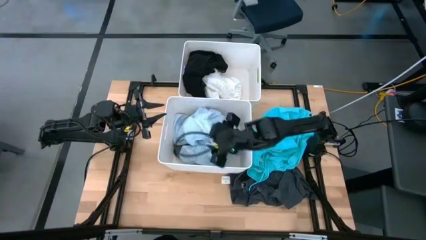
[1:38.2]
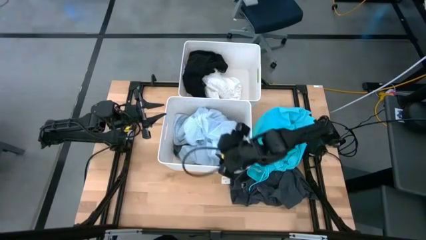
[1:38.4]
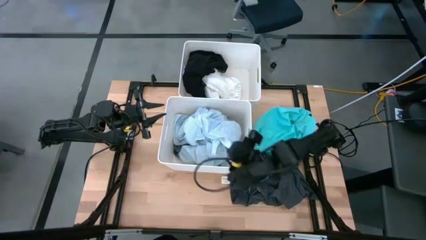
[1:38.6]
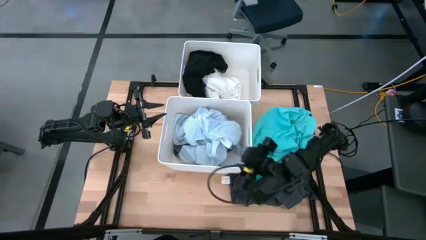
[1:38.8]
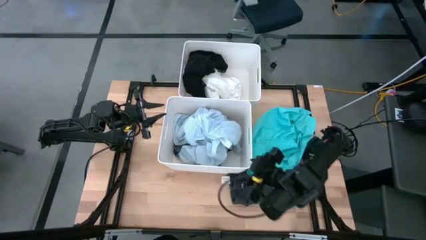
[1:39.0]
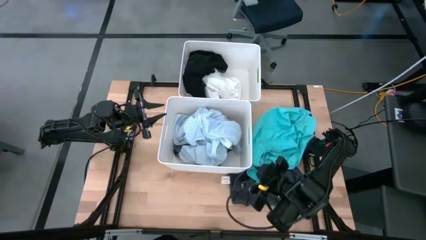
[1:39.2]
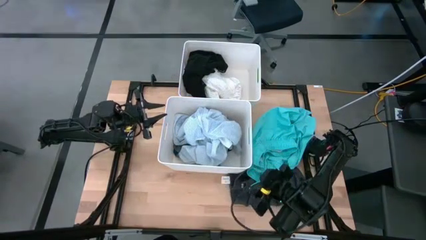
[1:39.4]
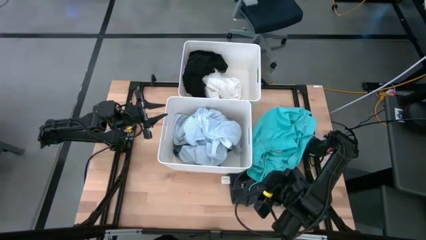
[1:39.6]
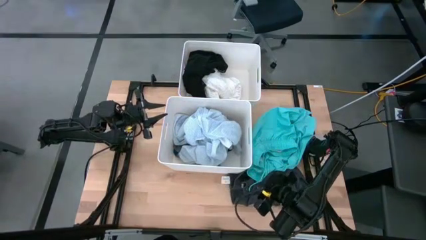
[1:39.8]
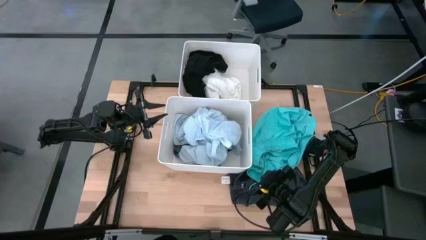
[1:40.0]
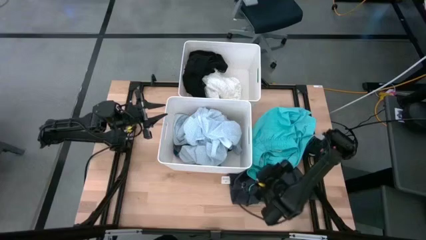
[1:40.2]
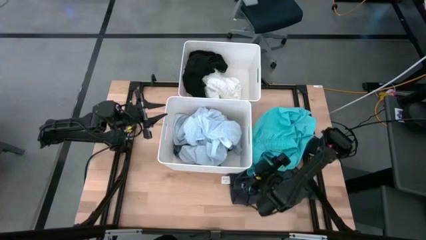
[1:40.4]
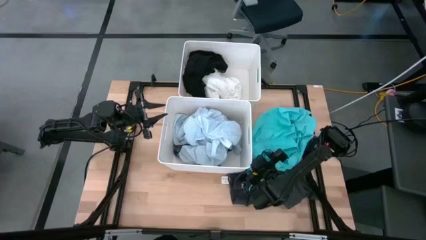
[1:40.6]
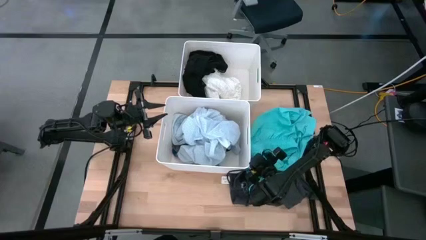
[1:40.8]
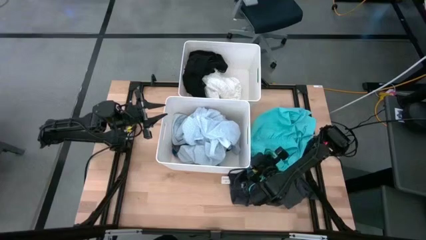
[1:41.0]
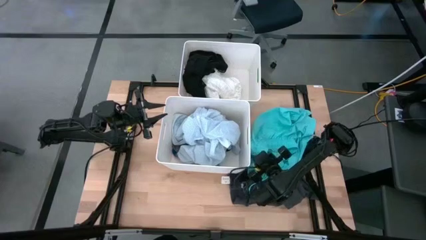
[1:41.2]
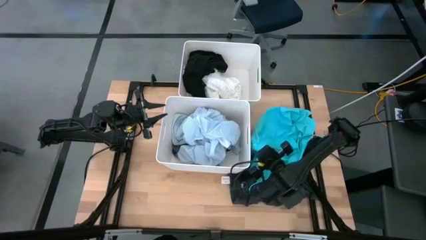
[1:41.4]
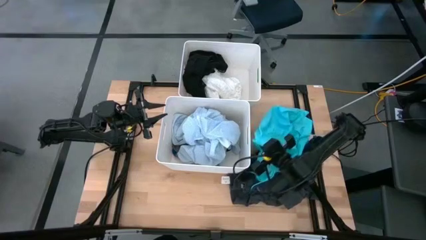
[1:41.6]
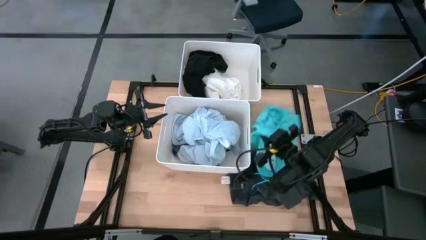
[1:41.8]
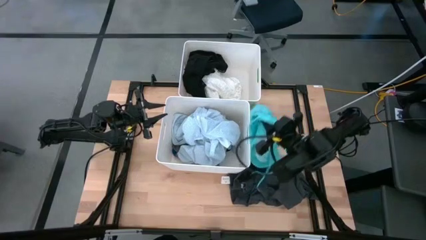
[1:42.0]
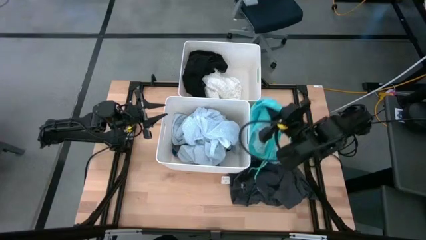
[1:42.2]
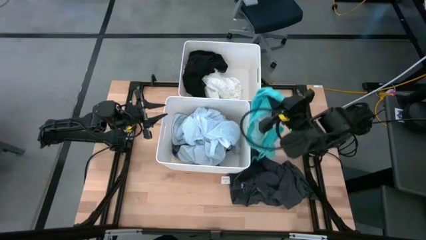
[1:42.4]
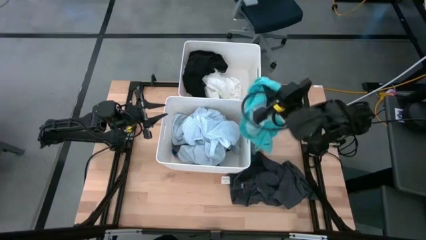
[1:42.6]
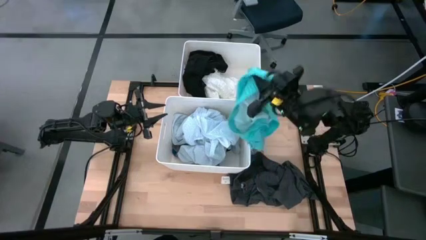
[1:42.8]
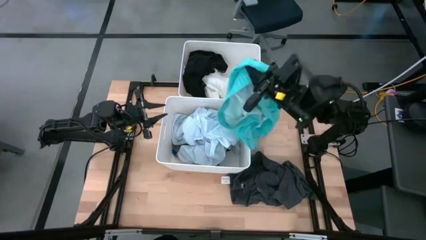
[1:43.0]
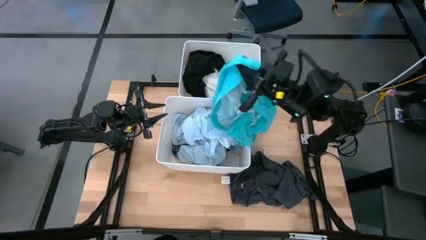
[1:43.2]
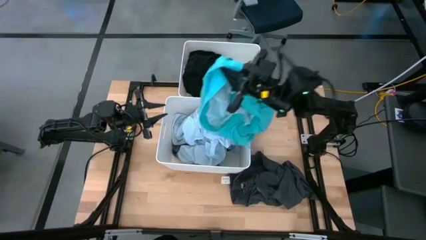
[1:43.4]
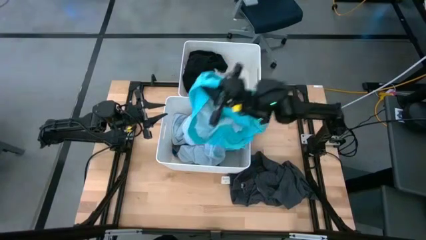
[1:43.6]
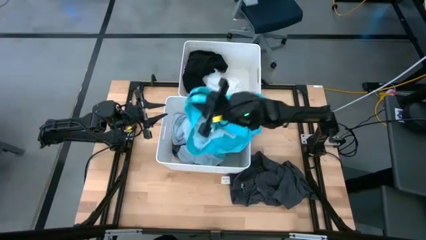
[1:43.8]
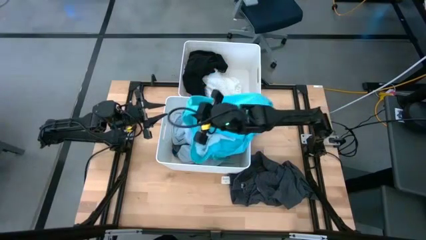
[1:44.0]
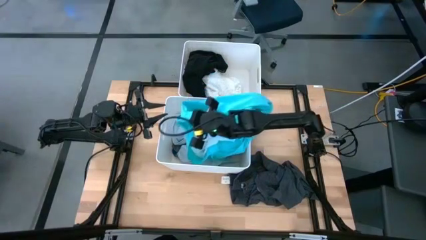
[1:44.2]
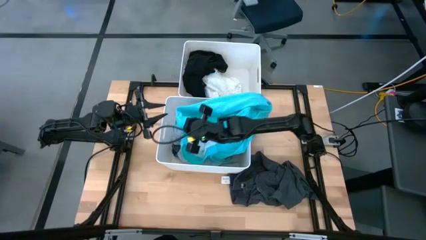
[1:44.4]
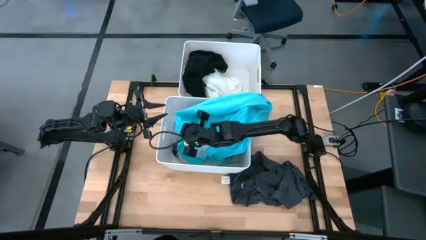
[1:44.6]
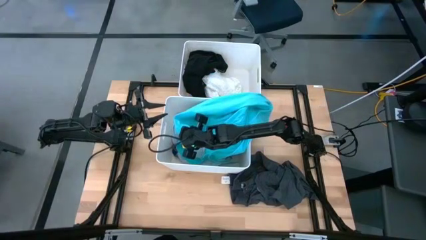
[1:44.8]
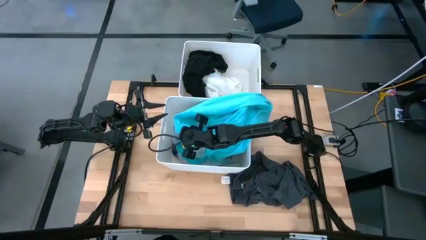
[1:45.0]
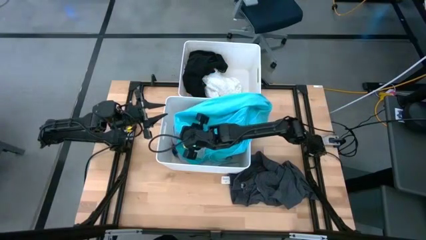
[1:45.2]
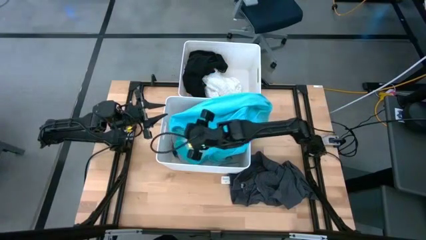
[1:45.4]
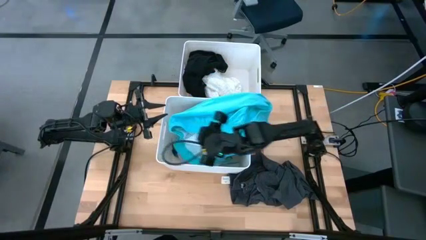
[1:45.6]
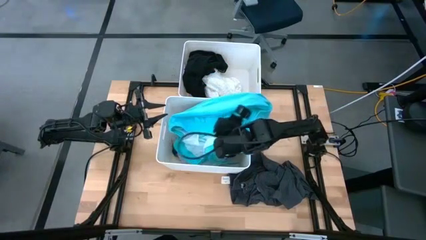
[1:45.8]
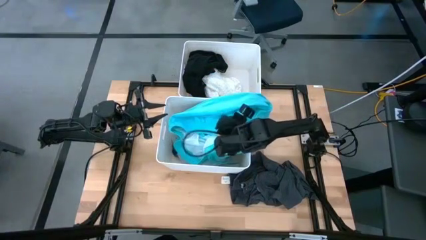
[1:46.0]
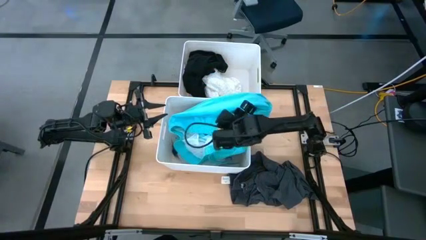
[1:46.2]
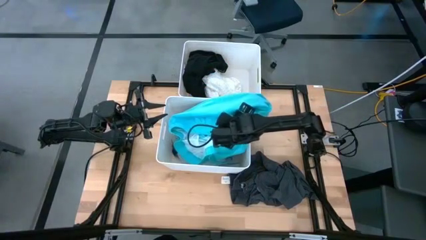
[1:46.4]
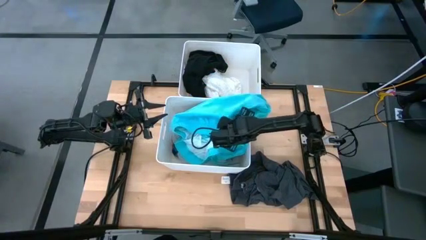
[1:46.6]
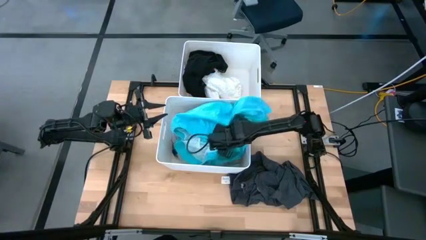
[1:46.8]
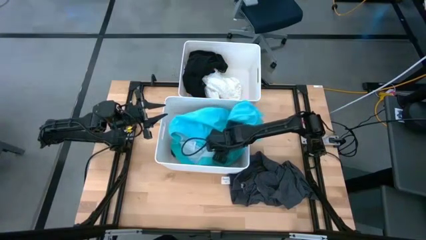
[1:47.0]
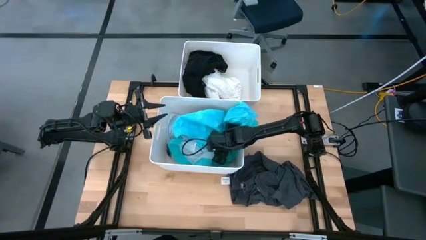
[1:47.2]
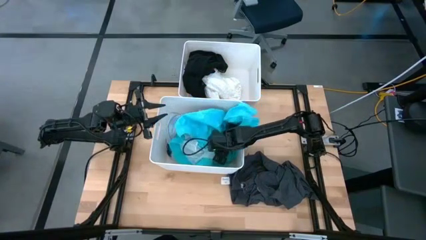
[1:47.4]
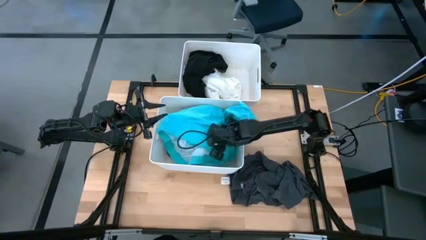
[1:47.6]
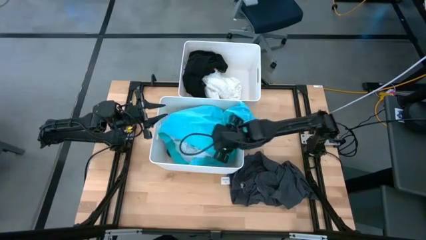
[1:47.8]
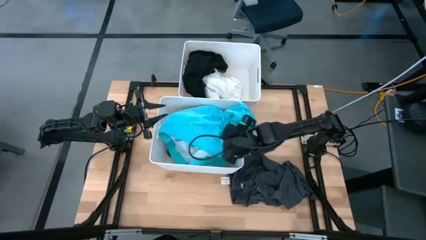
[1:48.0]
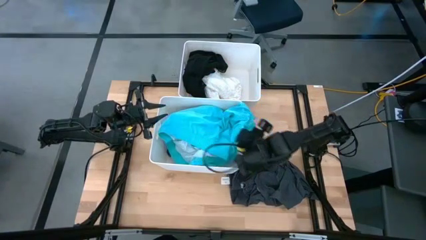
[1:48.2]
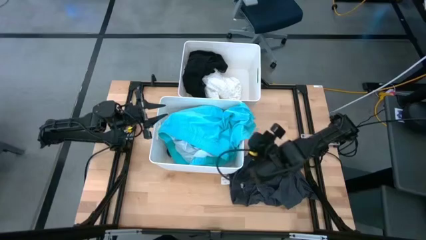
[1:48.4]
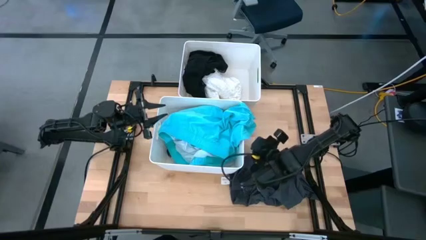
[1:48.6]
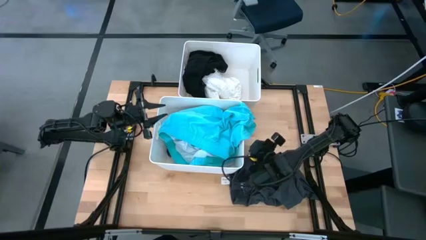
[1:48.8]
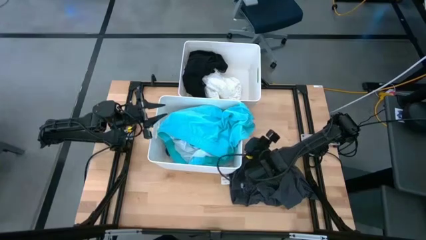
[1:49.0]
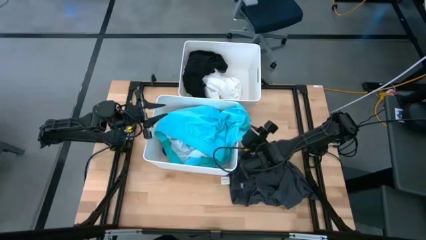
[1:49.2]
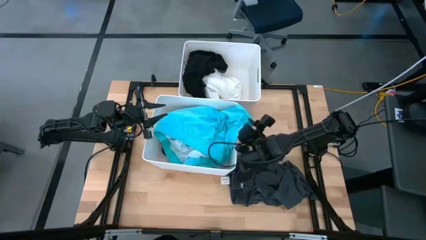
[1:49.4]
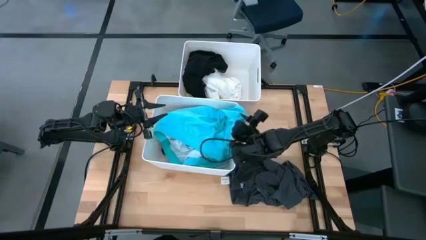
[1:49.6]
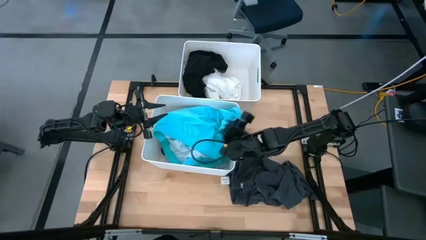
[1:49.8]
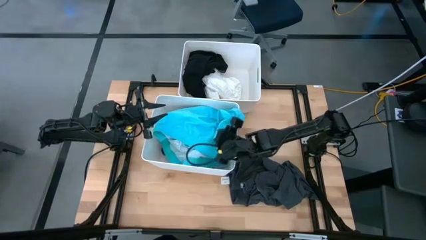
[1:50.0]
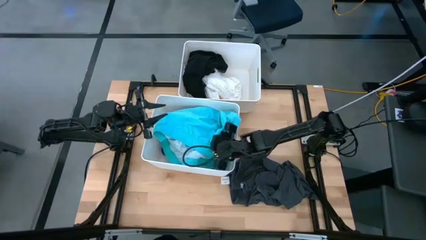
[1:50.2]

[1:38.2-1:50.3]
Task: Sort clothes
Put the light blue shorts into the bottom white bin
